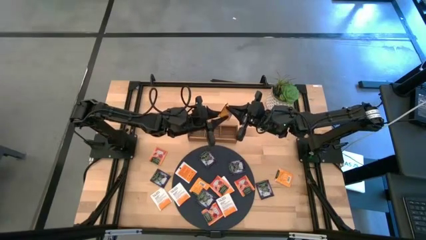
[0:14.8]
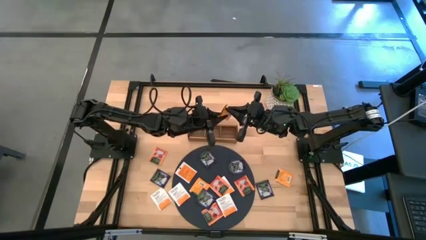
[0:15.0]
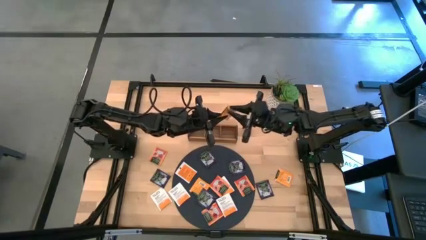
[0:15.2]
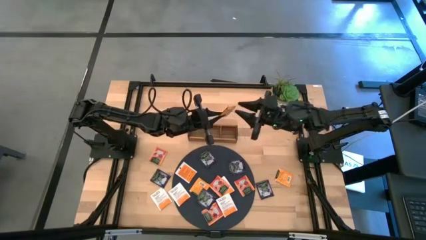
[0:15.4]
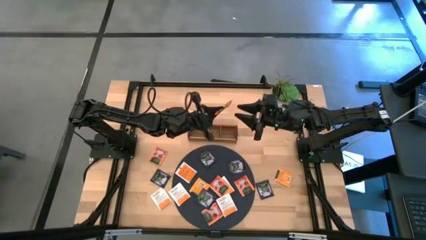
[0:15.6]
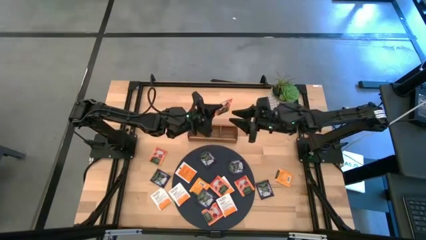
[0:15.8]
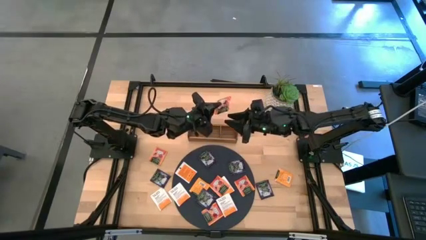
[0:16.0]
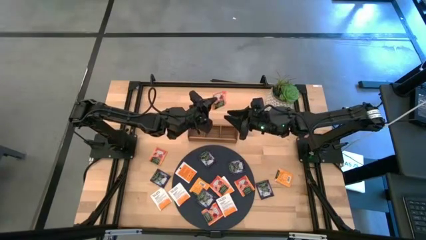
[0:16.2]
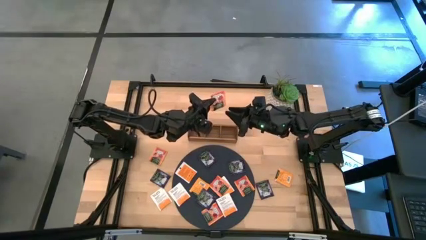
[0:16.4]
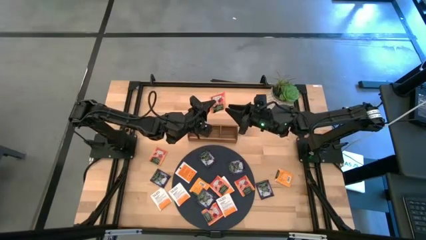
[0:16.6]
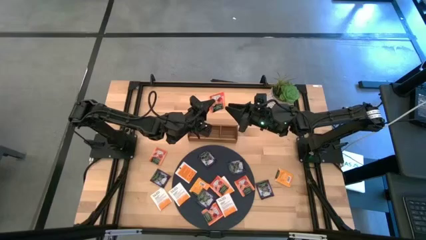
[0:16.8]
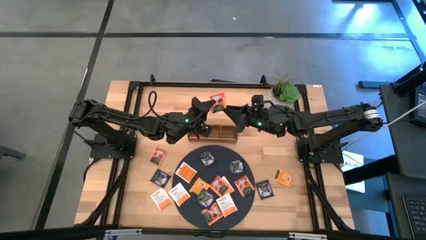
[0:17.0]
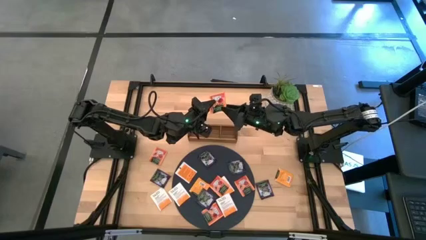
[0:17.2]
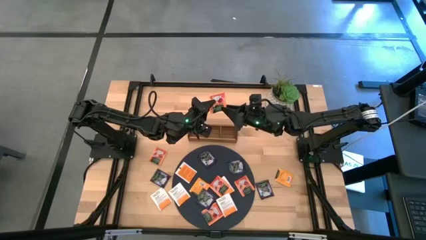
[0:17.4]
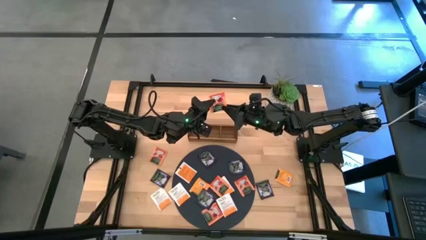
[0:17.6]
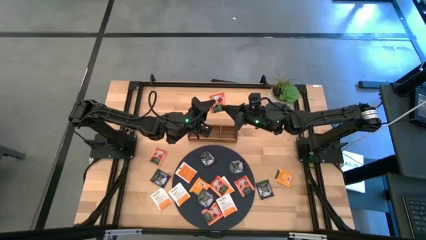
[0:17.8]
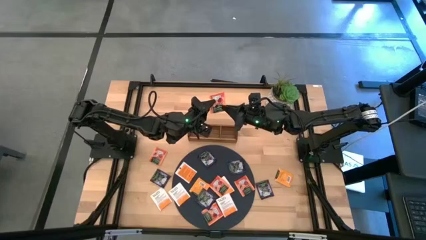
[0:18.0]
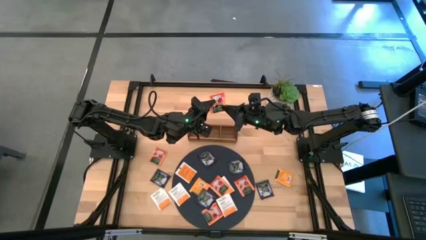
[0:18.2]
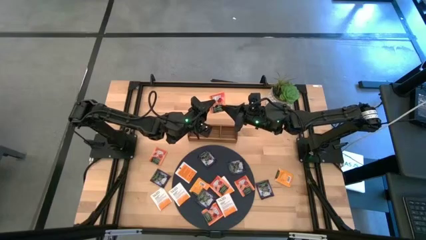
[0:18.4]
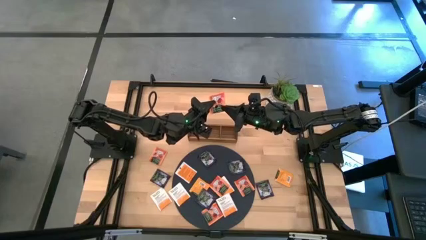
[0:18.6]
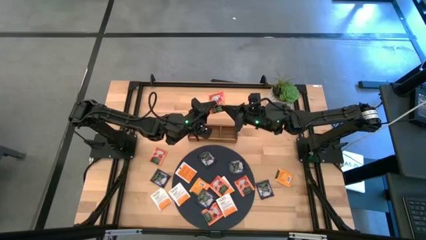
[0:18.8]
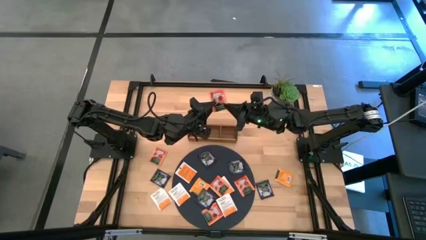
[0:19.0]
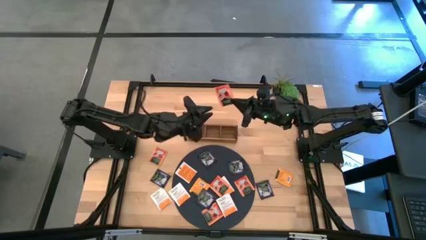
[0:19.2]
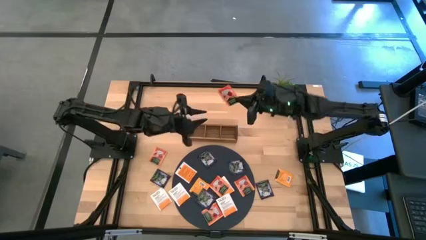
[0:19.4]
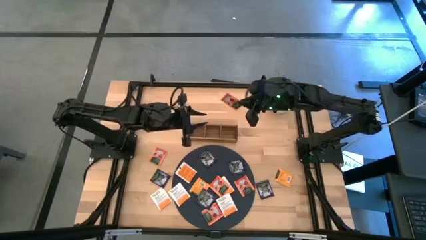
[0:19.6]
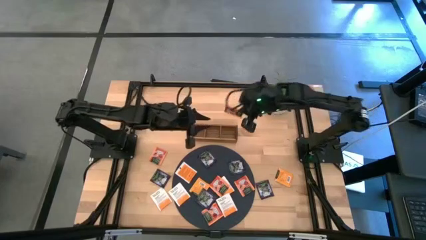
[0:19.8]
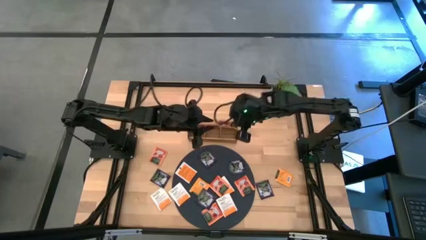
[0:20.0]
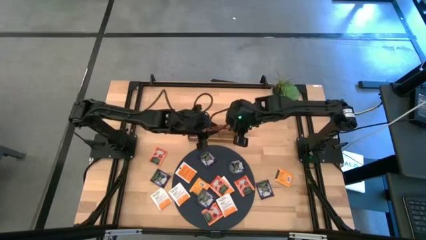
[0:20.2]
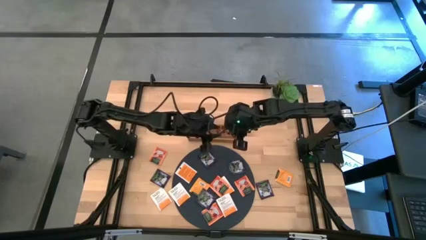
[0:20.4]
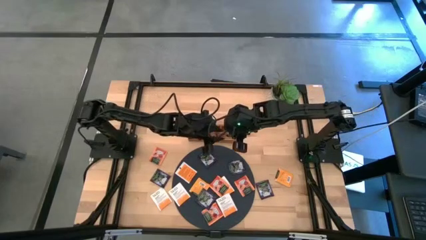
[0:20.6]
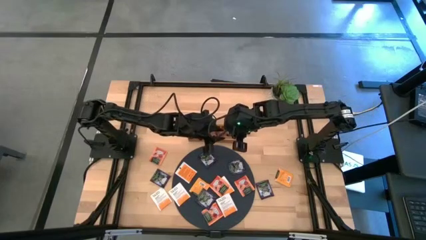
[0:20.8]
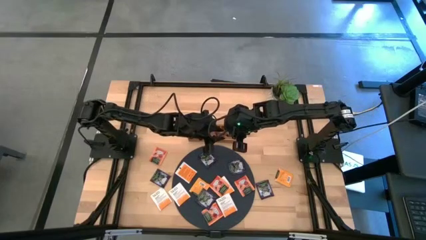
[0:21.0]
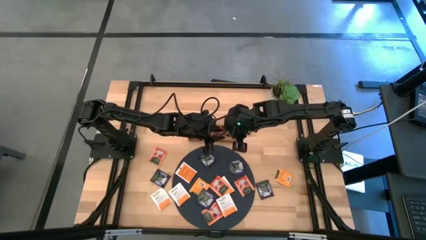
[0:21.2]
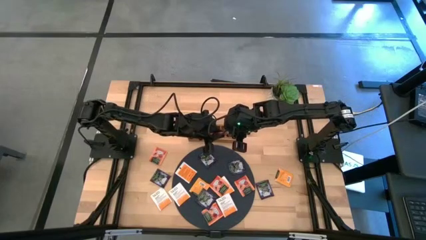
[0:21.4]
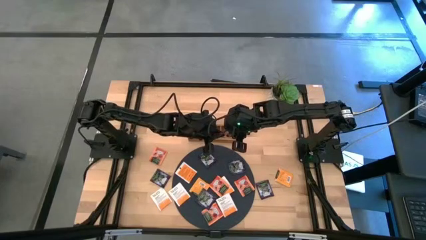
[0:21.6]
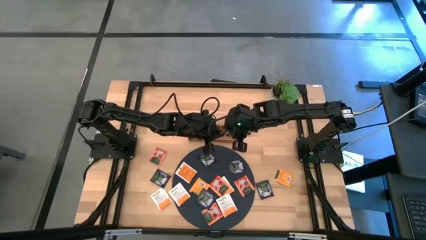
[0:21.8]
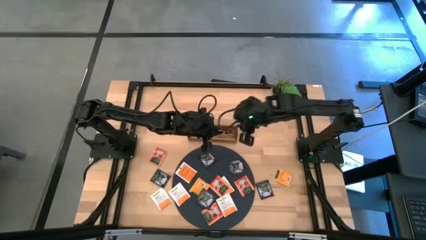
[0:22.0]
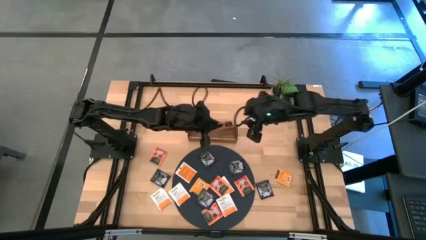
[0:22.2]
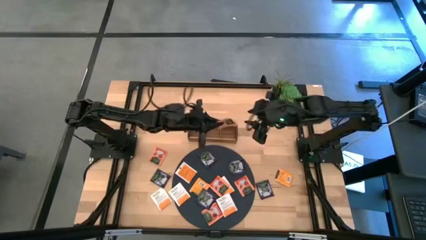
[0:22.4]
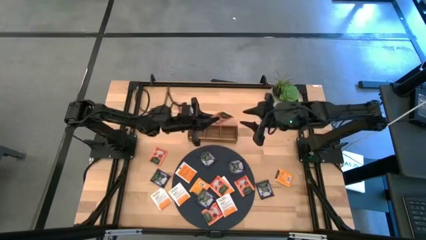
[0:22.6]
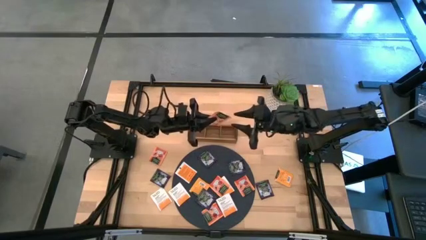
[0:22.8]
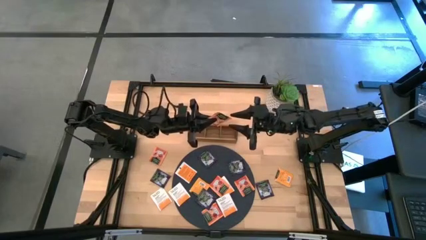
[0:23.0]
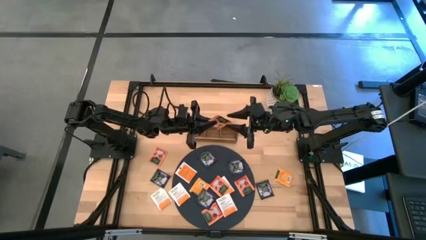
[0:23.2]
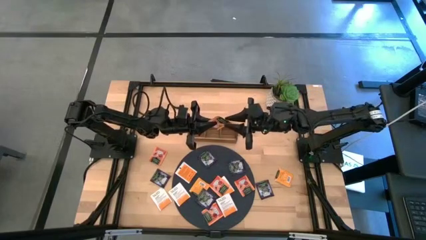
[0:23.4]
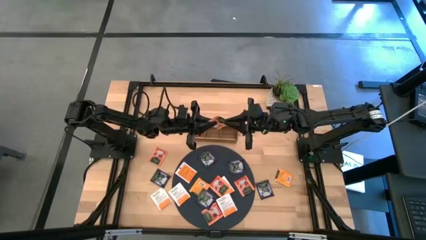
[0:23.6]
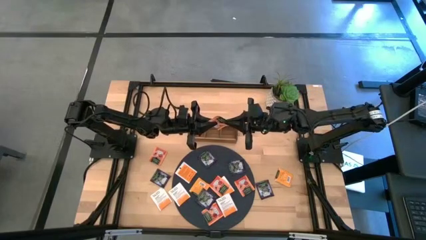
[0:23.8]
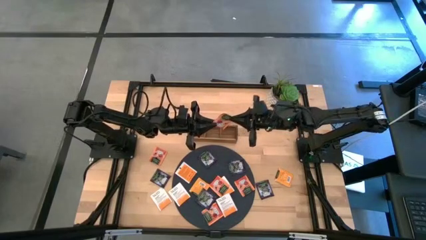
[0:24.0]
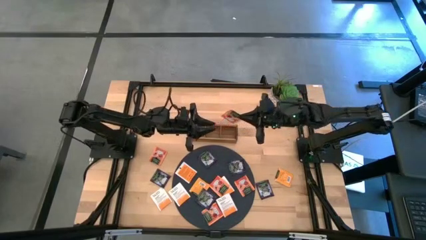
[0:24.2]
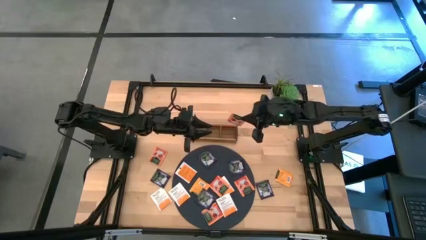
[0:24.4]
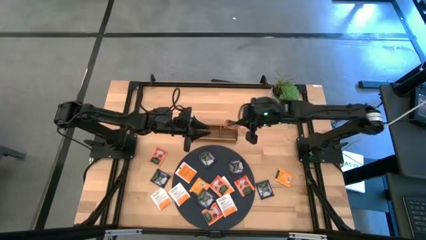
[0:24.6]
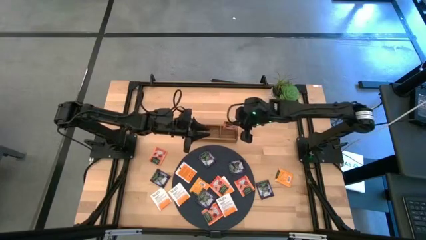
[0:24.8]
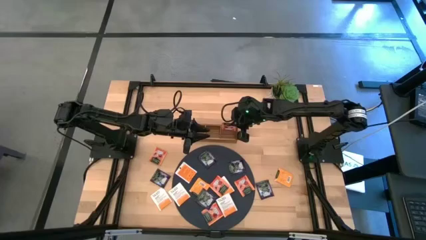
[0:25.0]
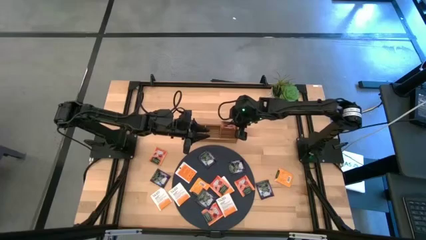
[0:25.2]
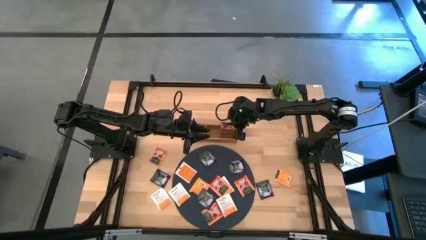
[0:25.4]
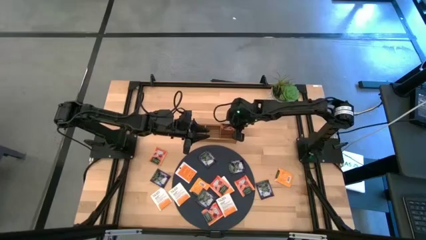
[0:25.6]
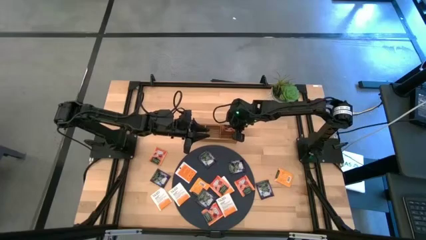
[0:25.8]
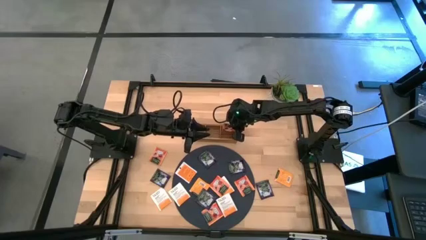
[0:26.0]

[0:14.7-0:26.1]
Task: Pick & Place Tea
Put the orange tea bag into the right of the wooden organizer

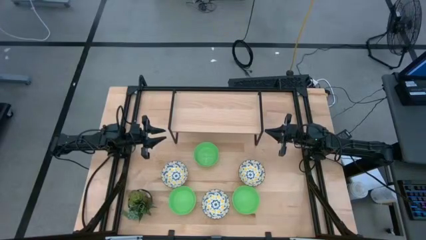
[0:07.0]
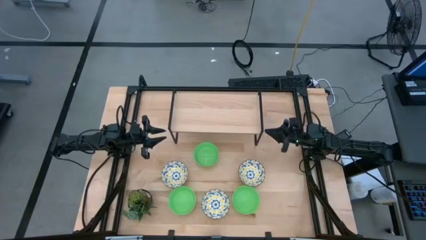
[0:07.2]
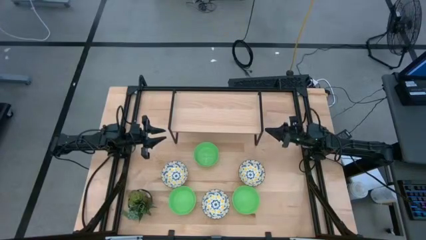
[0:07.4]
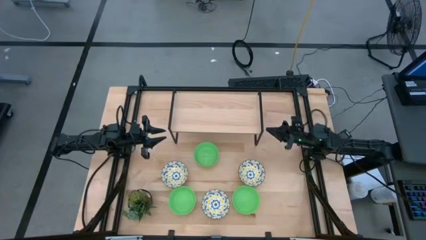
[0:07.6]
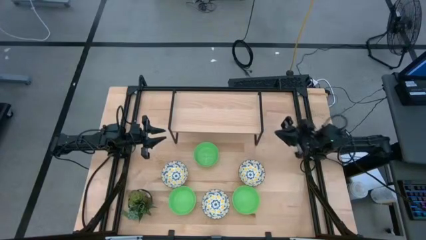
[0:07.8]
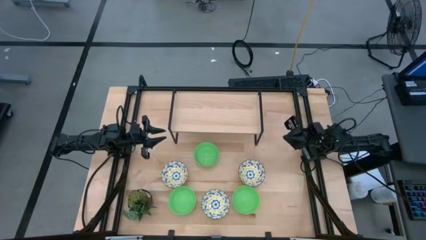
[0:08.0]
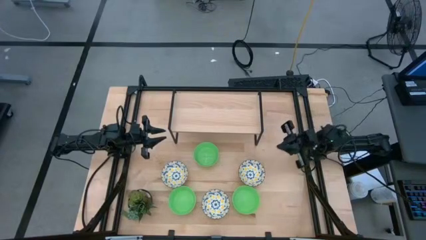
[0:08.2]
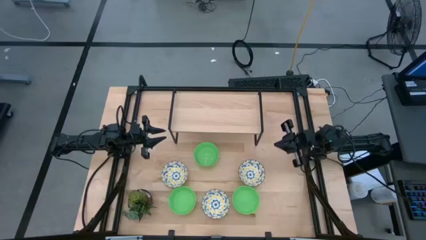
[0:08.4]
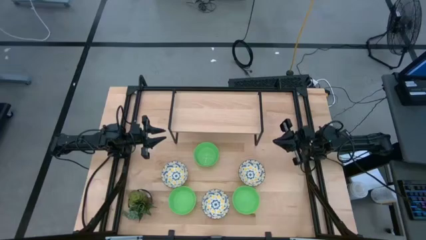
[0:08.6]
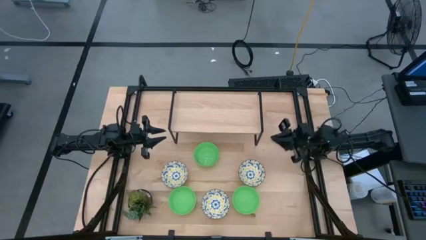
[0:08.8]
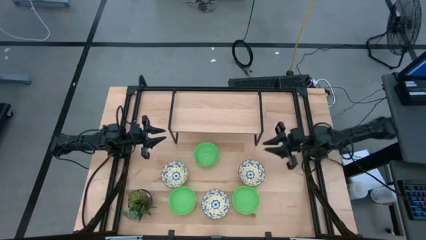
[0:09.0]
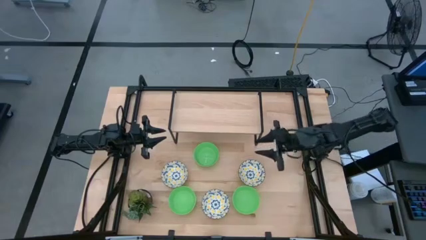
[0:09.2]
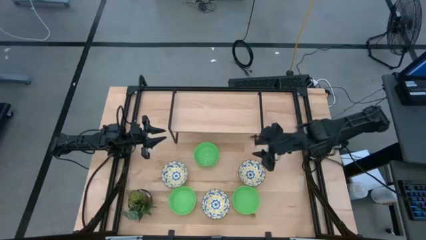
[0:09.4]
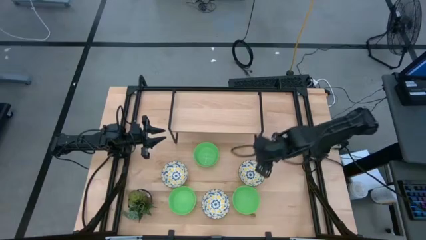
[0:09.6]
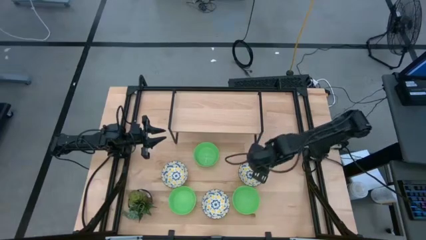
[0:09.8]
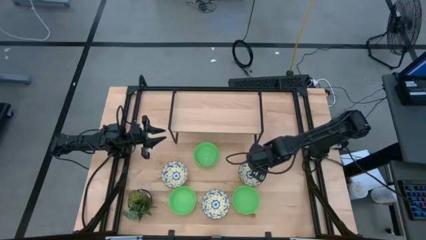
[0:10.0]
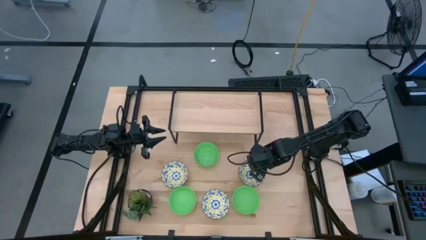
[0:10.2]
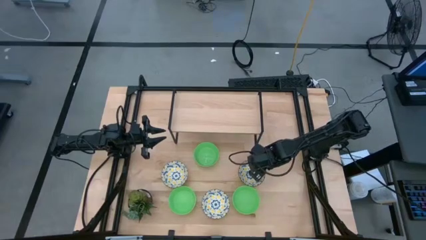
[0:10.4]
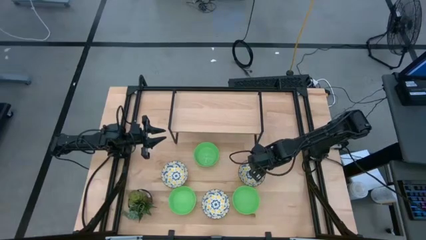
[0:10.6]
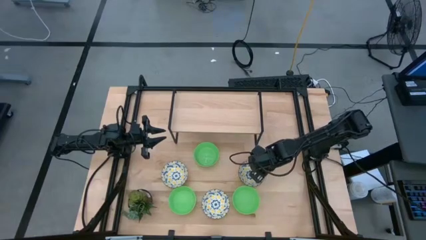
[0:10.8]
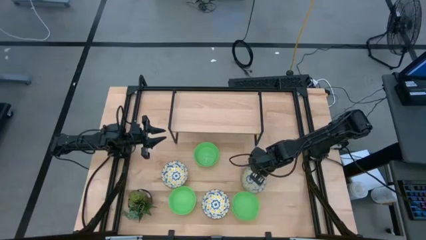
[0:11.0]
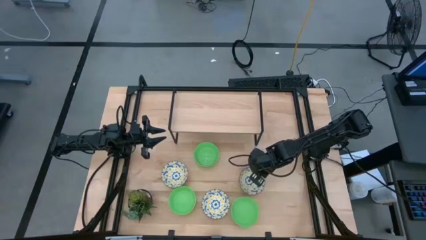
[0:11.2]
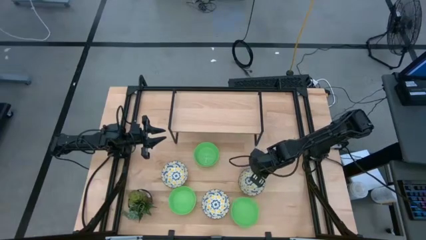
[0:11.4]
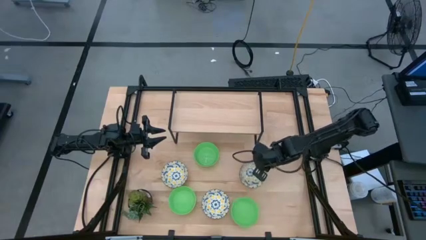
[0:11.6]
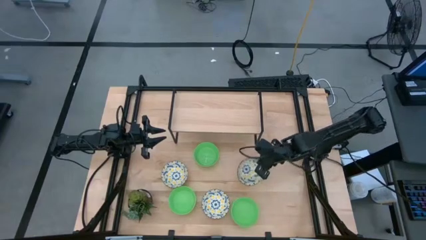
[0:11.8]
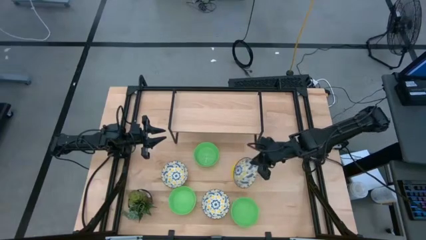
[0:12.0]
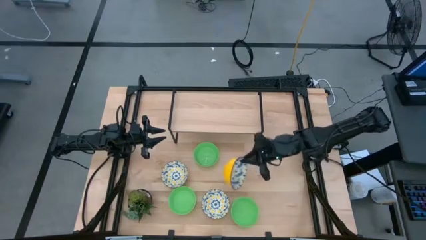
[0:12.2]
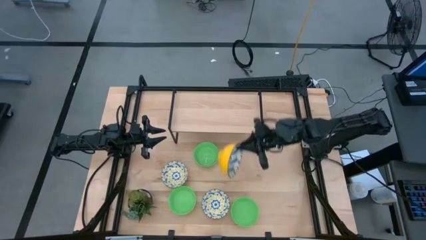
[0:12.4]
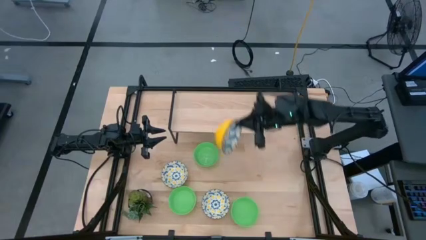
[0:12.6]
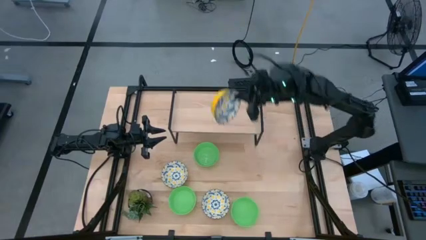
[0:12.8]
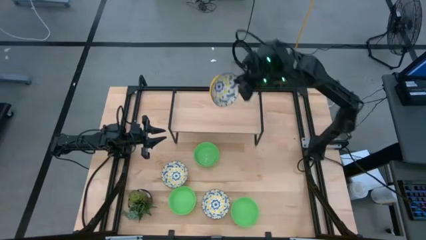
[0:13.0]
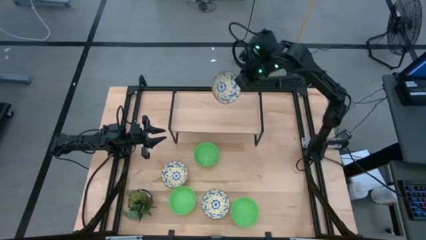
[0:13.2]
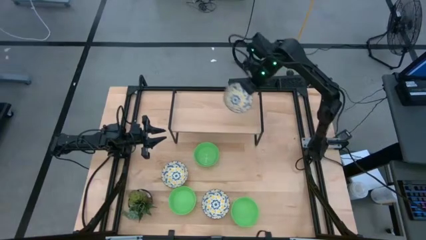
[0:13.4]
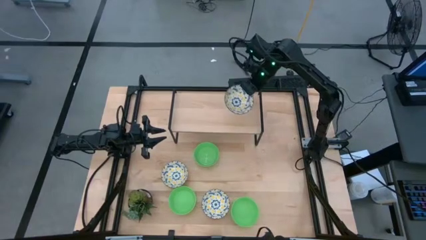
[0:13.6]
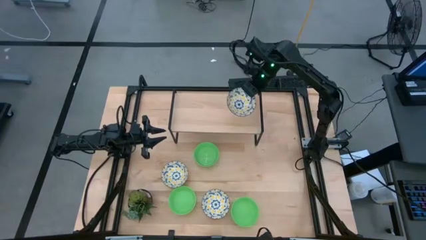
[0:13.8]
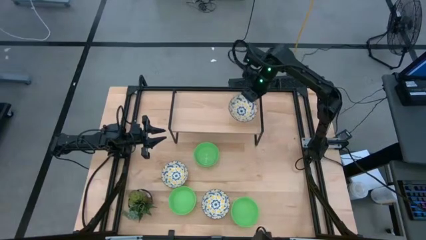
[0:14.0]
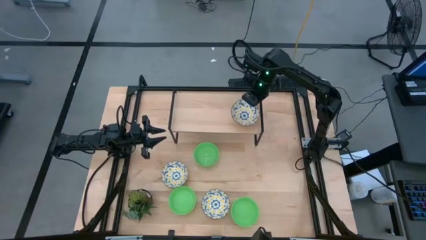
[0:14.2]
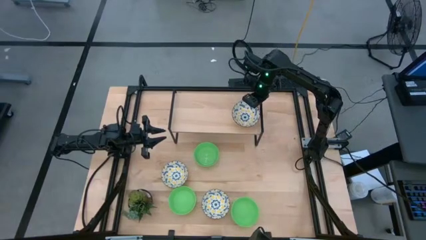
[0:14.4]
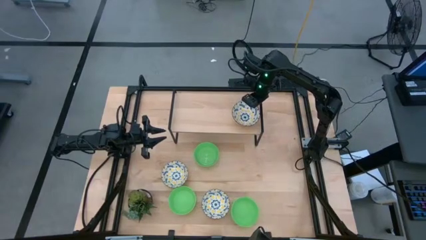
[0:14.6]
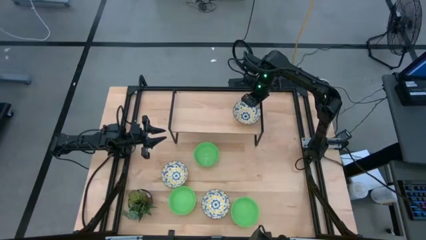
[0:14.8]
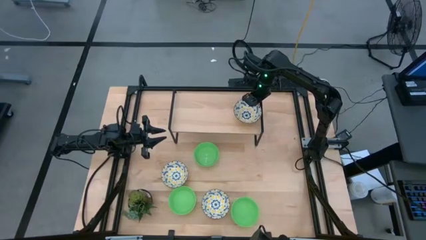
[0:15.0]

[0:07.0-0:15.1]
Task: Pick & Place Mini bowls
Put the top right white bowl on the shelf
